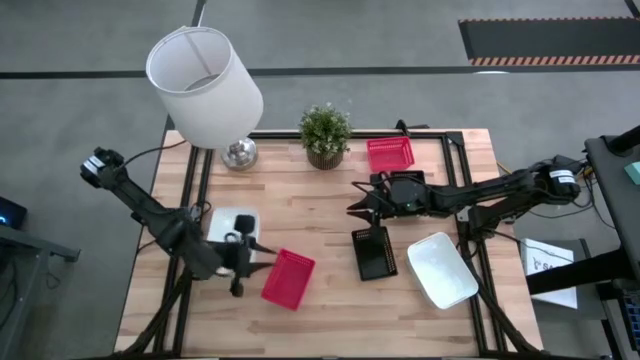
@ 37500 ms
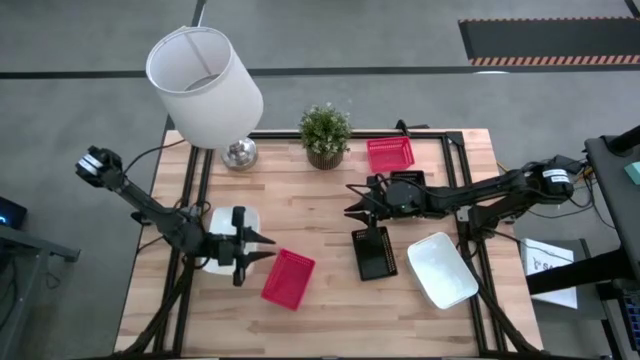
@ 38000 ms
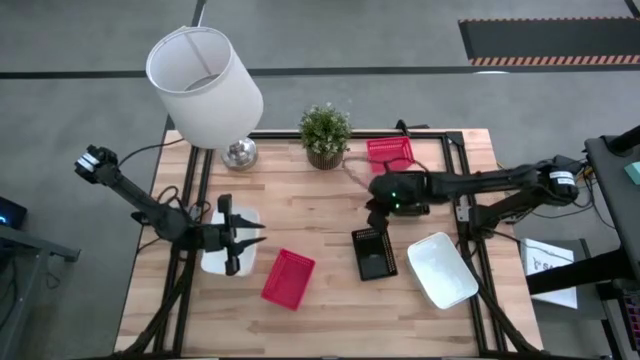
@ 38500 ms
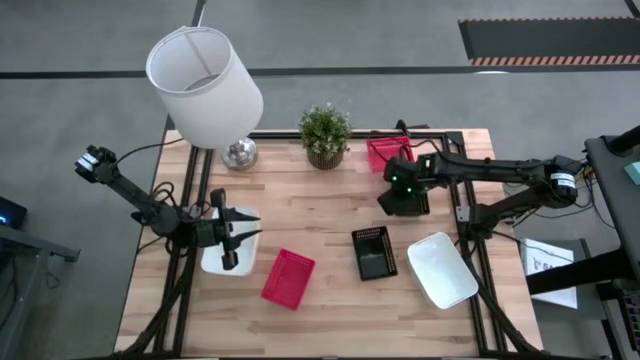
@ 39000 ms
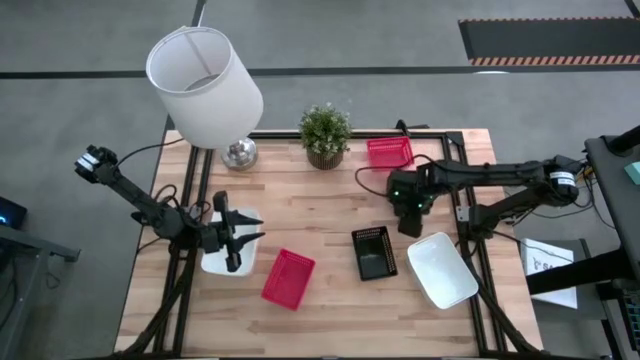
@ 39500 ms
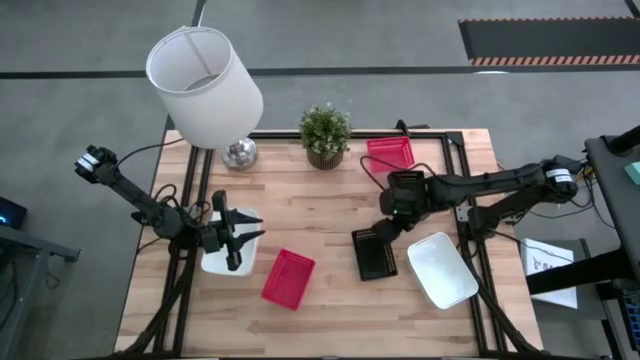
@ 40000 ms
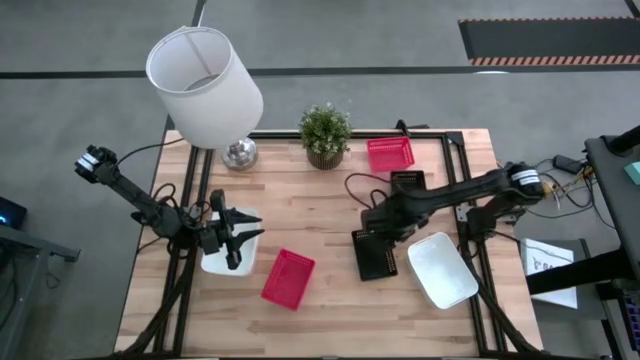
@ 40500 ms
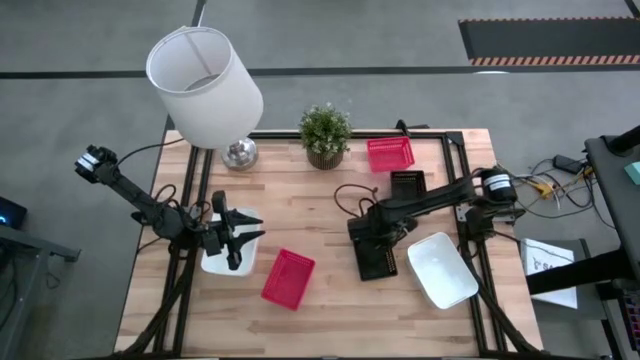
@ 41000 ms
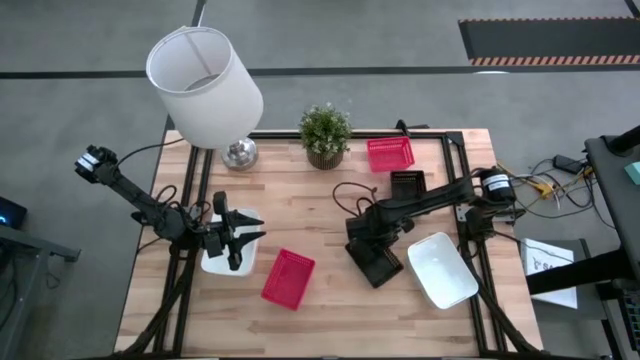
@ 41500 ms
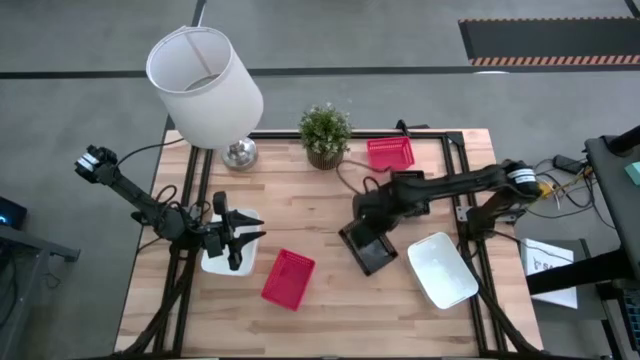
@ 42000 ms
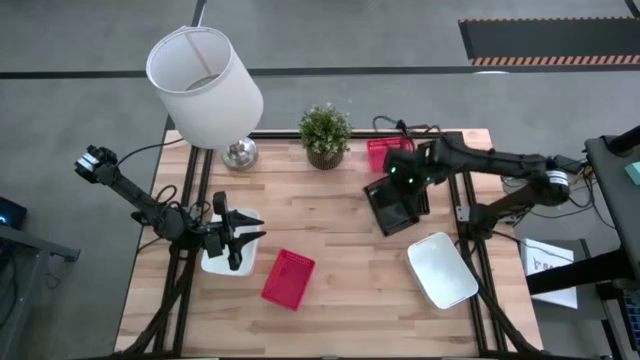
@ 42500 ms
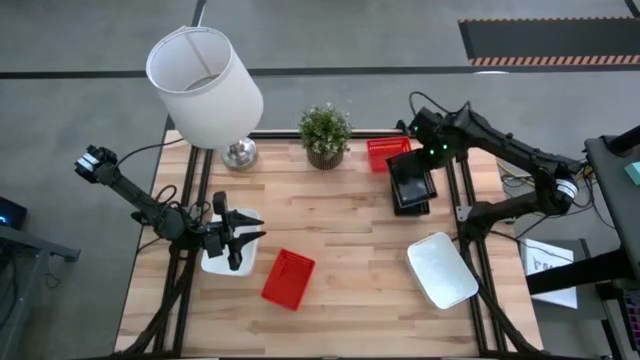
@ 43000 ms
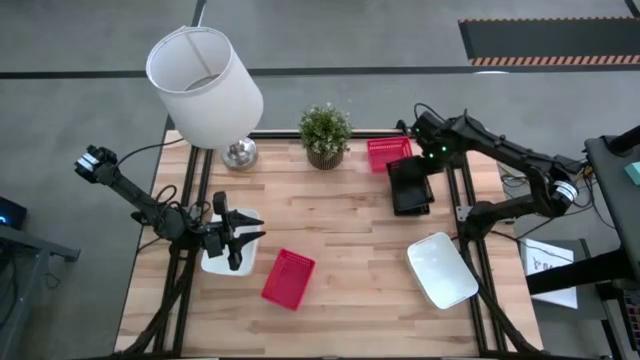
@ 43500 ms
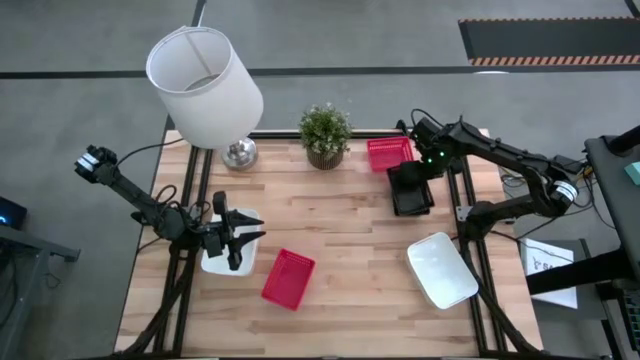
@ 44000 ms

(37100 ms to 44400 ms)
Stack the black bin on the black bins

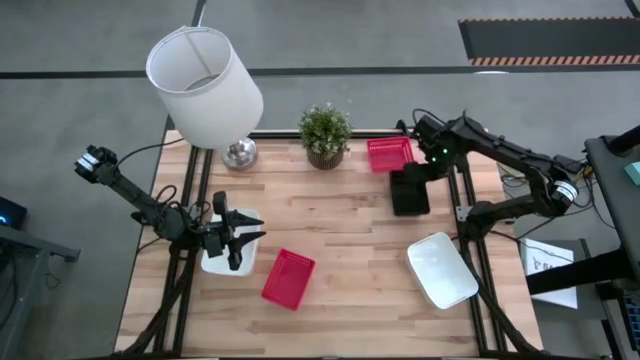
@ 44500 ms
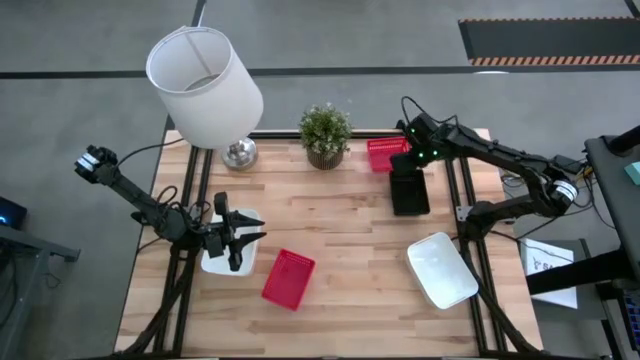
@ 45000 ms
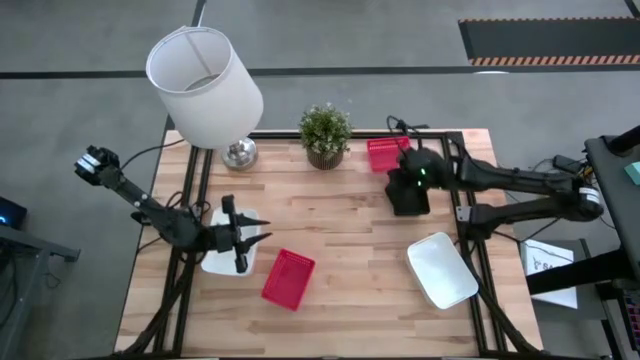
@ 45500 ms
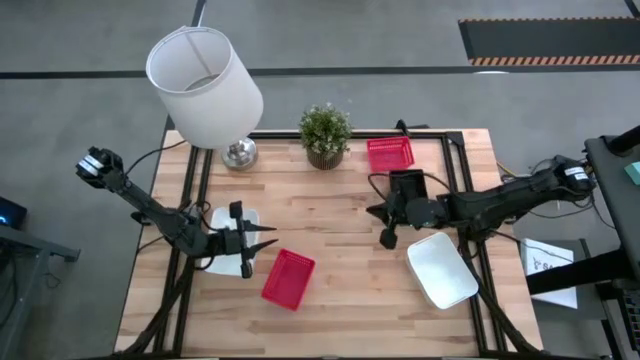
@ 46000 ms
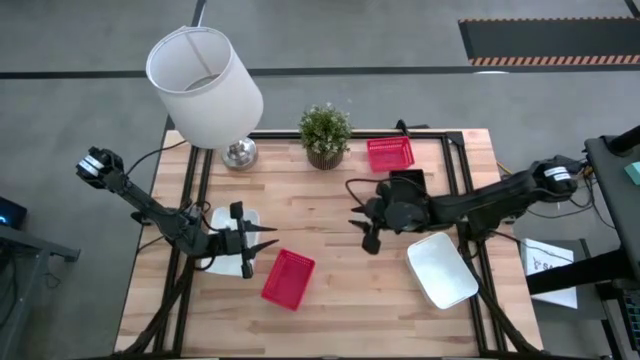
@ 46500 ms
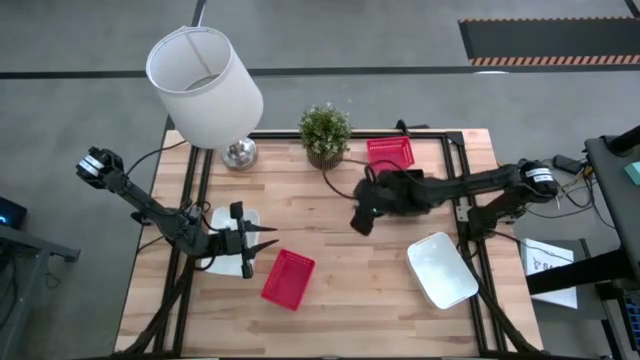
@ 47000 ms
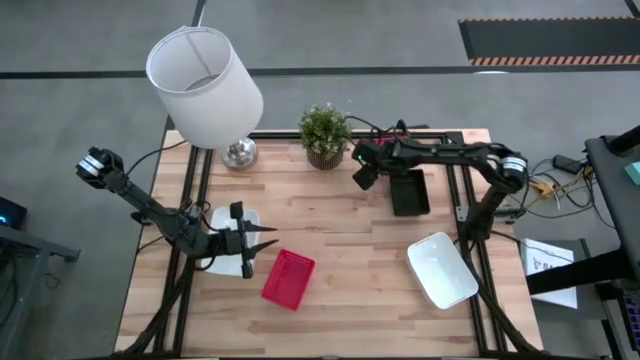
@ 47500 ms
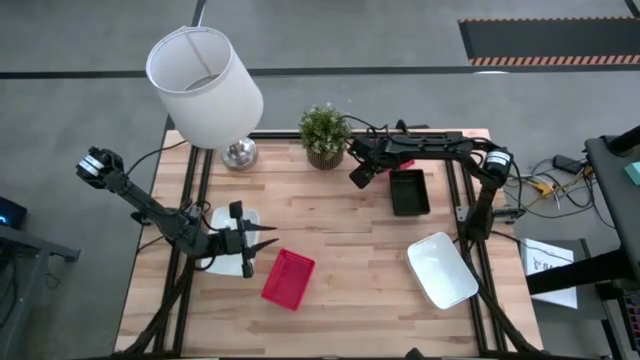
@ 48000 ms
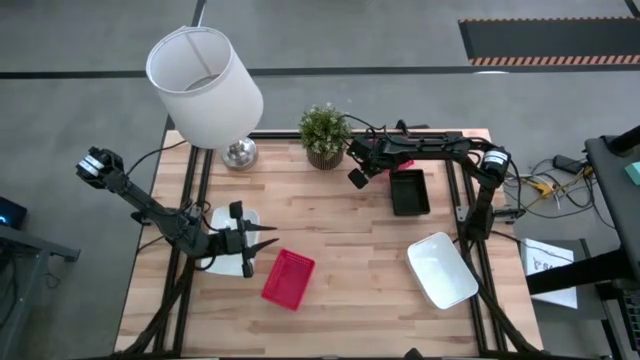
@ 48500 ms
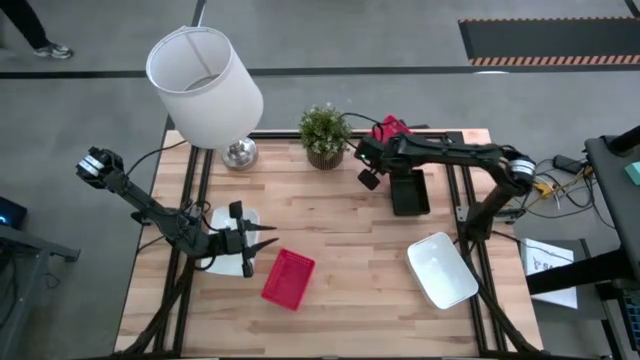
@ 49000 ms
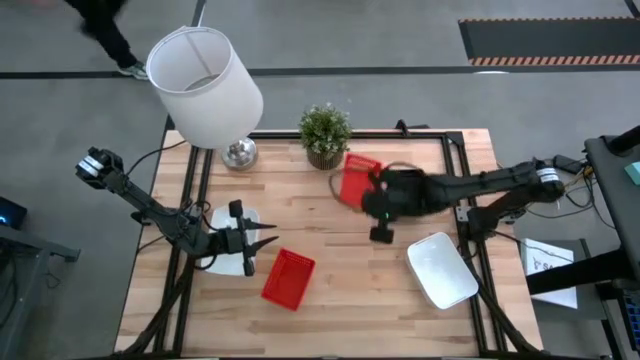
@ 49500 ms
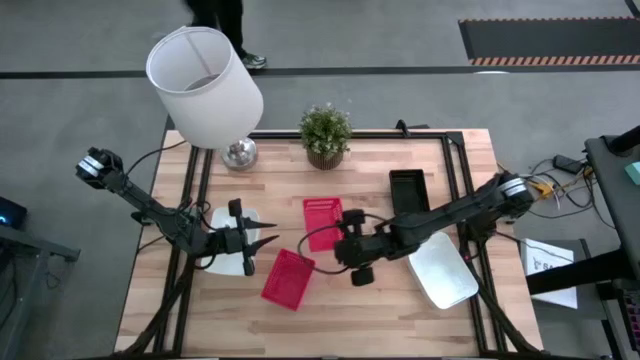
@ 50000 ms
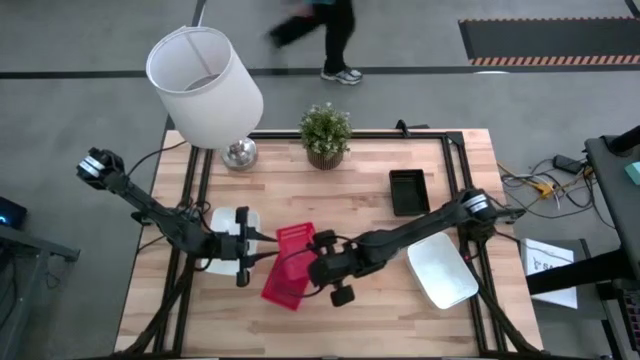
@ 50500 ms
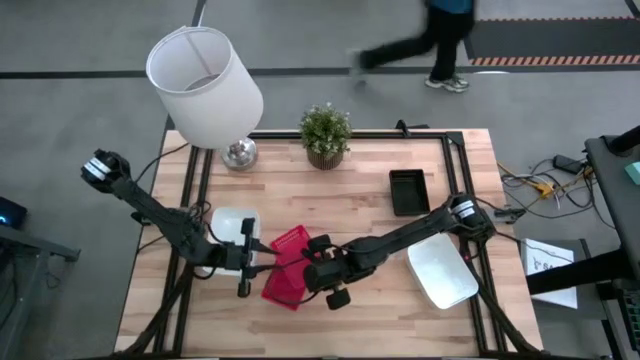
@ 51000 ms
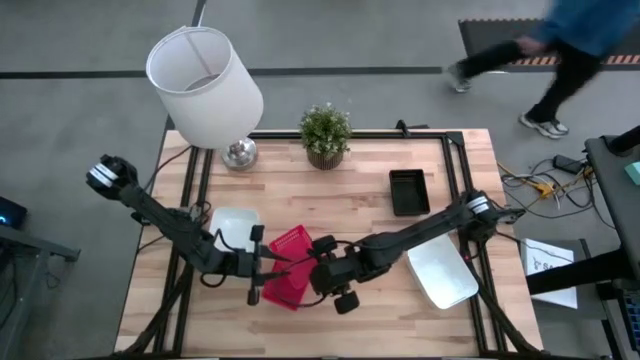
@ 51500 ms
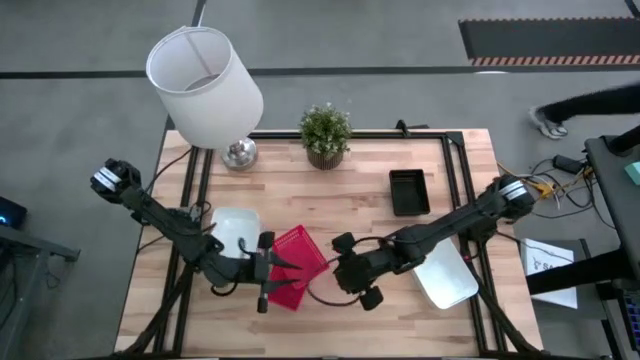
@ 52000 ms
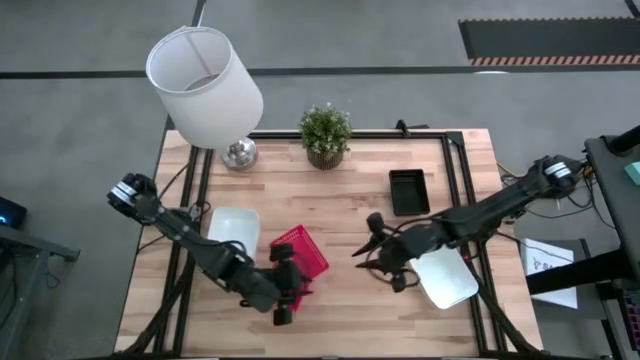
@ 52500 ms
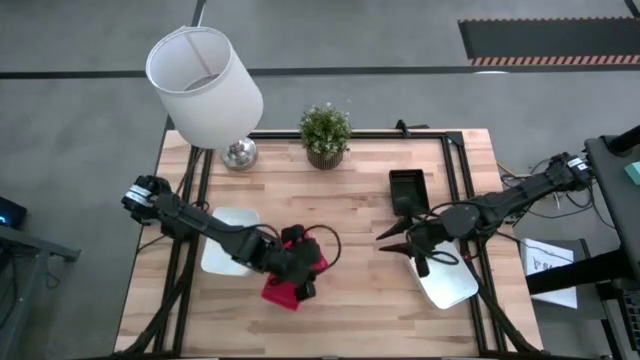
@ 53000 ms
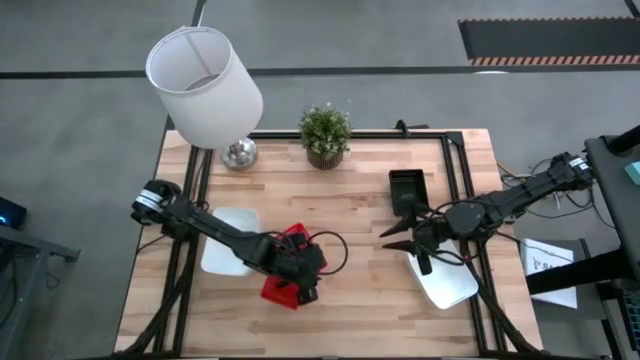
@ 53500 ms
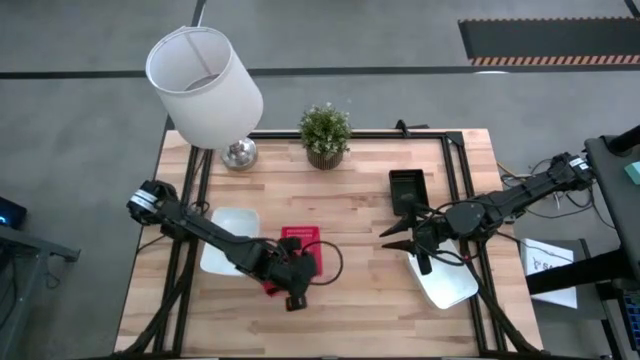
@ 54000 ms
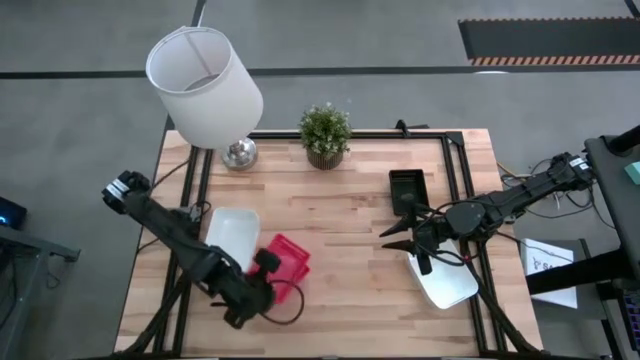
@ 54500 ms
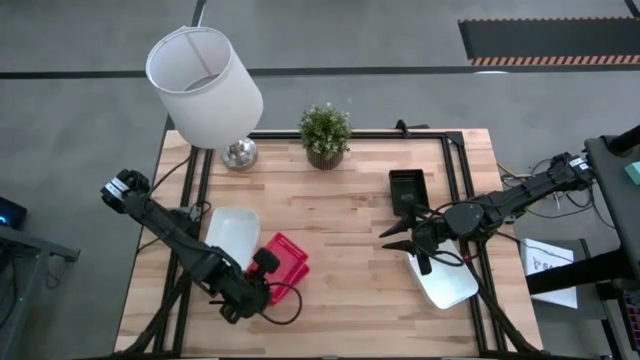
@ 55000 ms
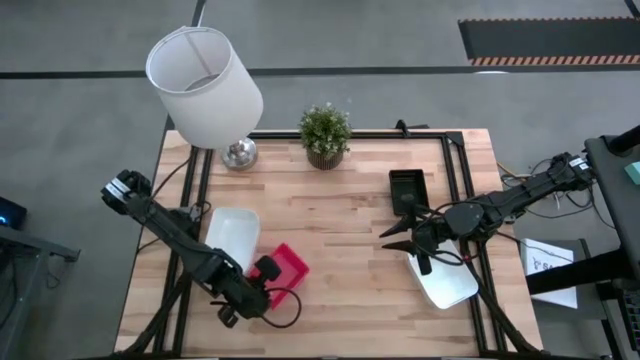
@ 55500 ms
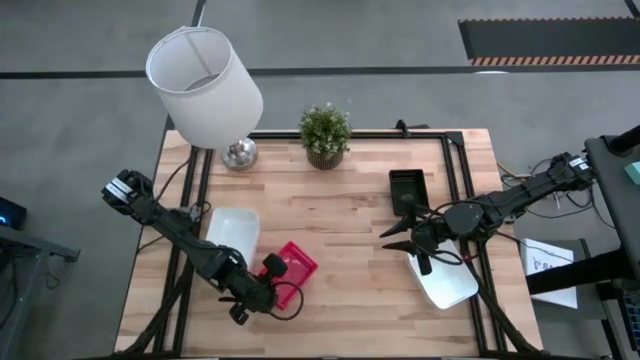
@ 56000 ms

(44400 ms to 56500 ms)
Stack the red bin on the stacked red bins

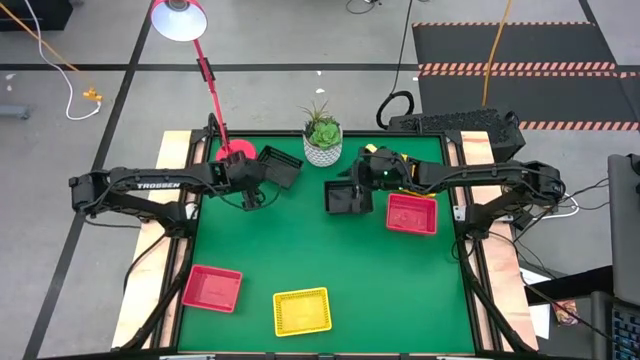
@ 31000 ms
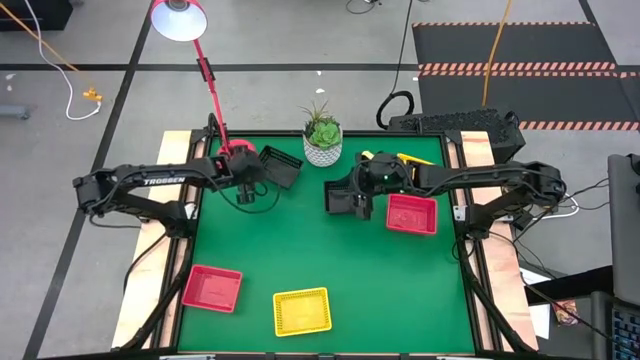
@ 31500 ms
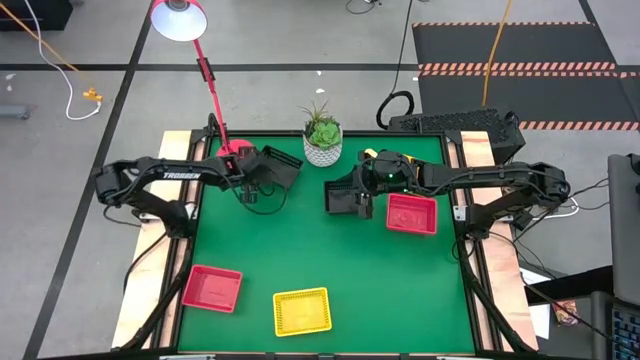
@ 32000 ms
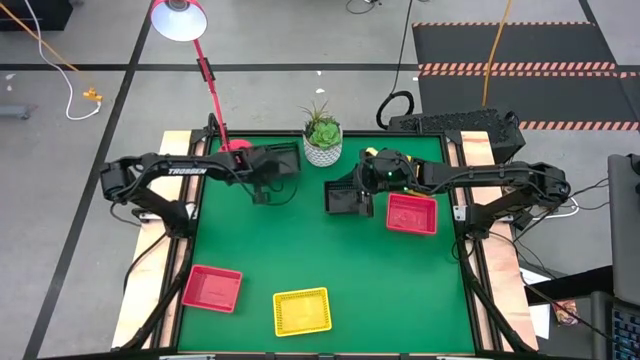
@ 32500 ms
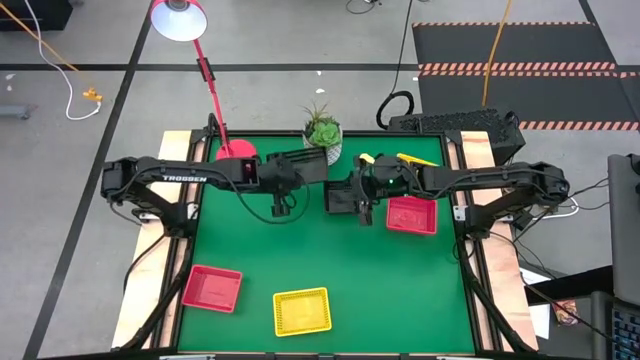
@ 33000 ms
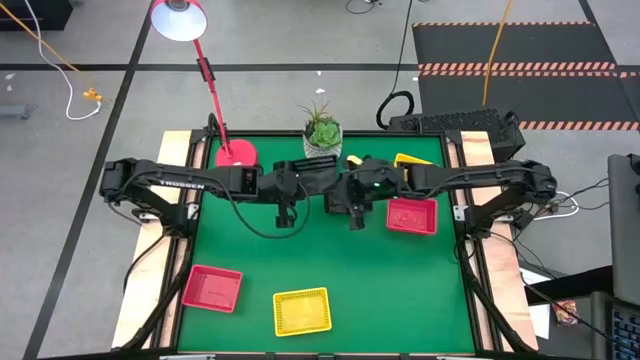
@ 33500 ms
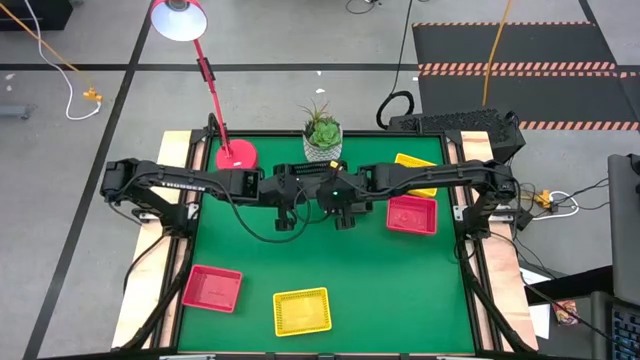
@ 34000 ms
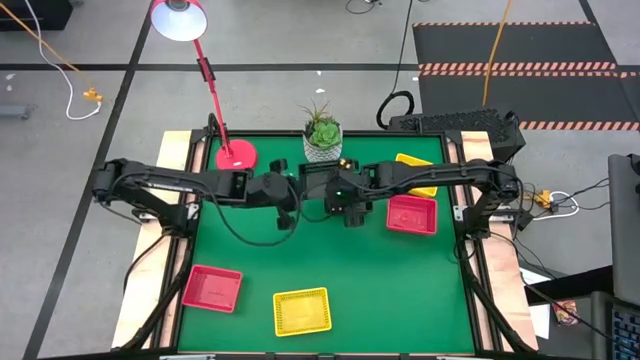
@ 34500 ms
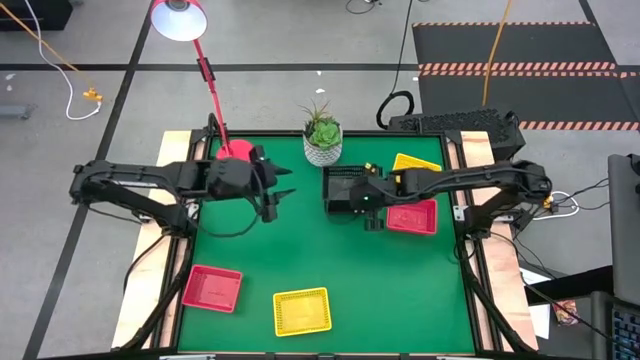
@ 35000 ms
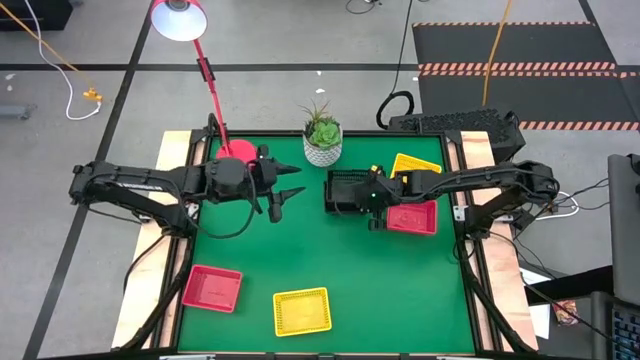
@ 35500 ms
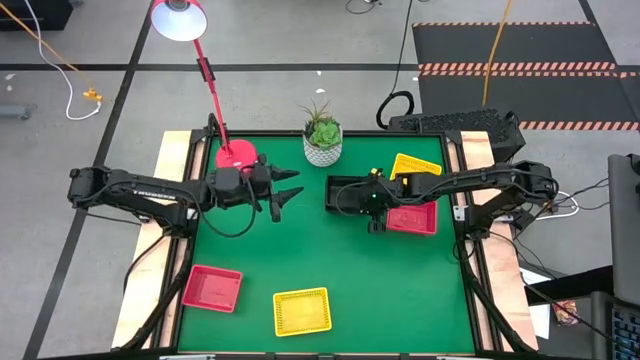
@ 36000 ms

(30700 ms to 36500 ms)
Stack the black bin on top of the stacked black bins
